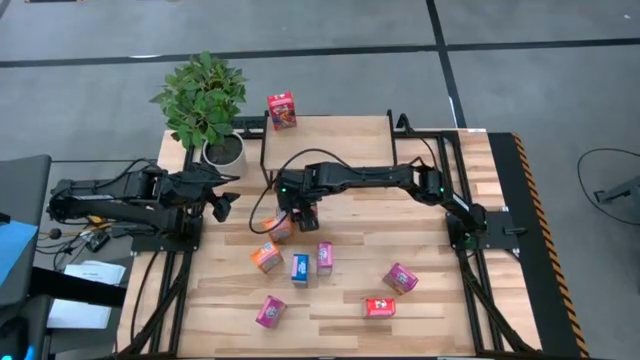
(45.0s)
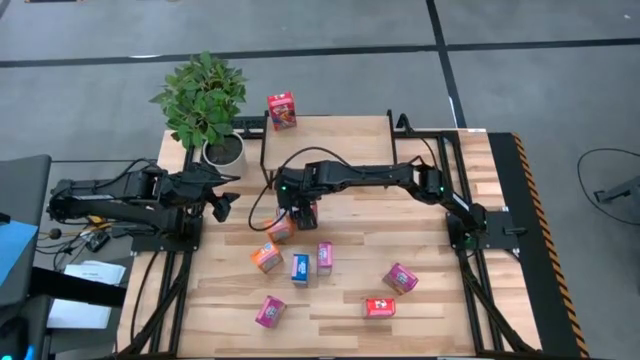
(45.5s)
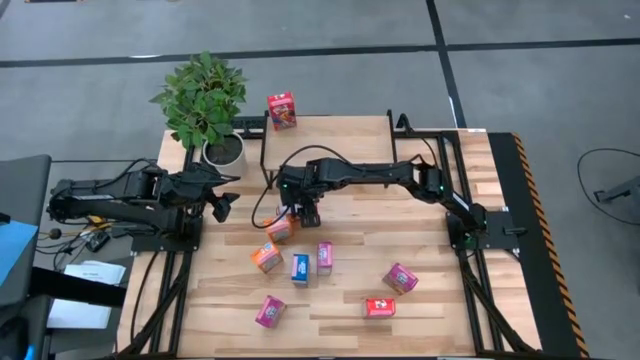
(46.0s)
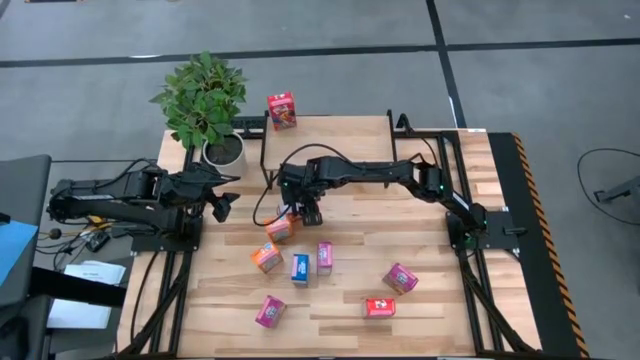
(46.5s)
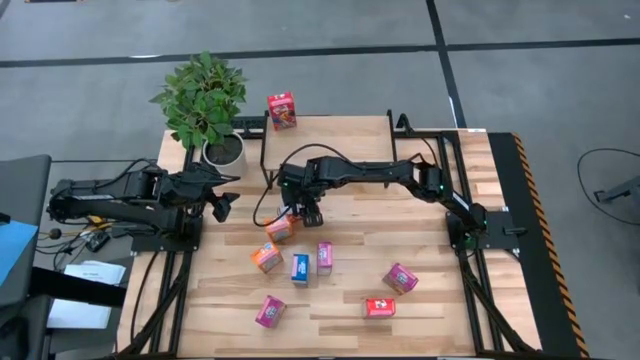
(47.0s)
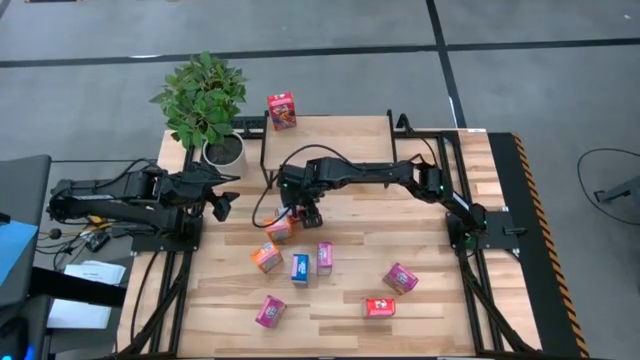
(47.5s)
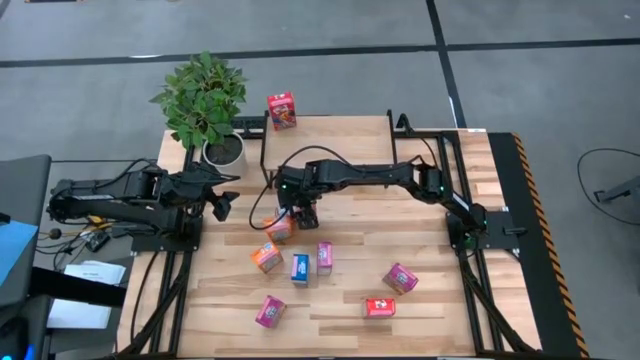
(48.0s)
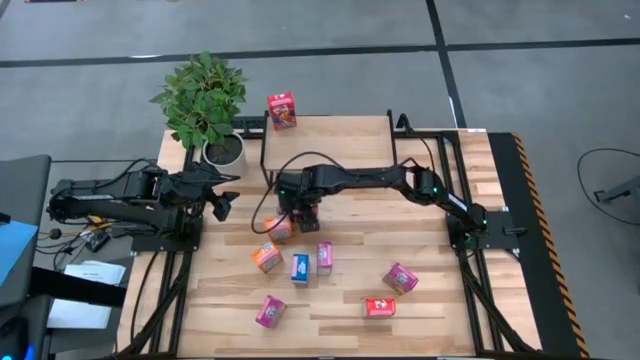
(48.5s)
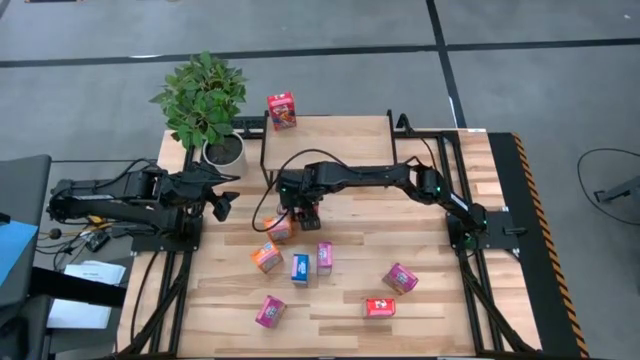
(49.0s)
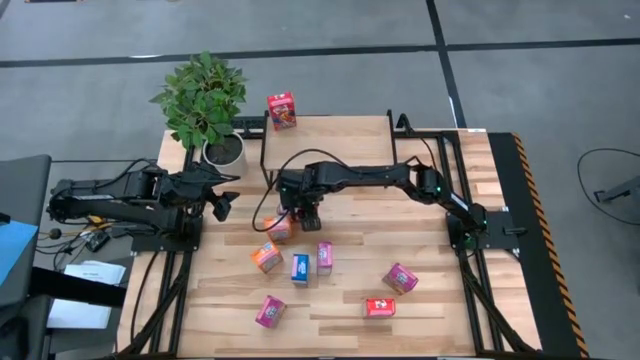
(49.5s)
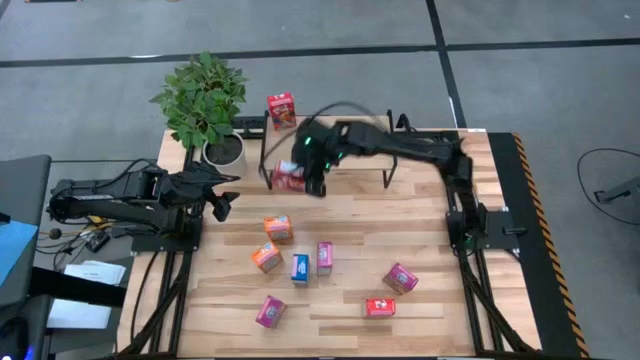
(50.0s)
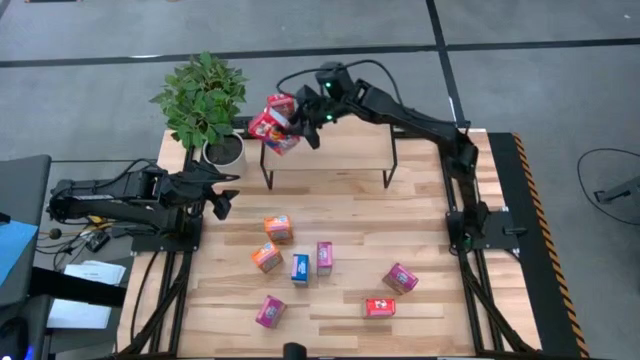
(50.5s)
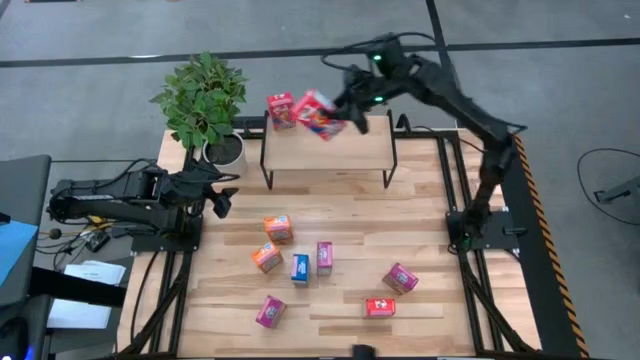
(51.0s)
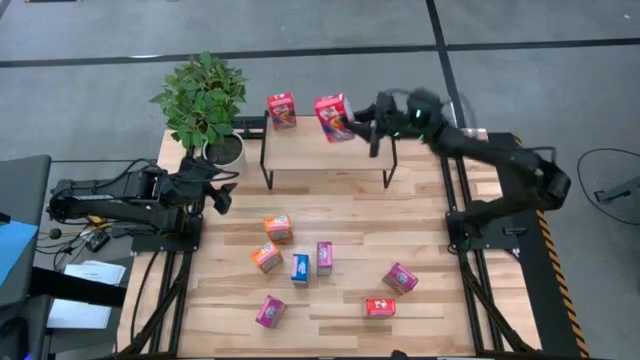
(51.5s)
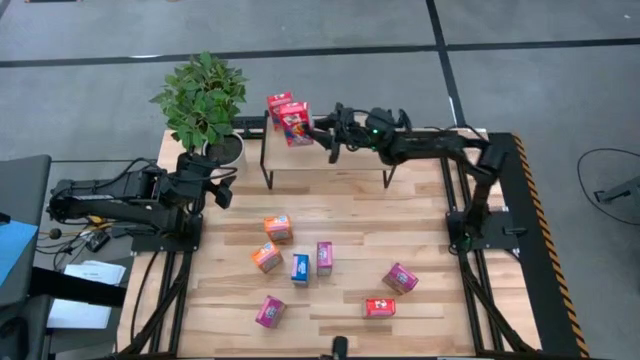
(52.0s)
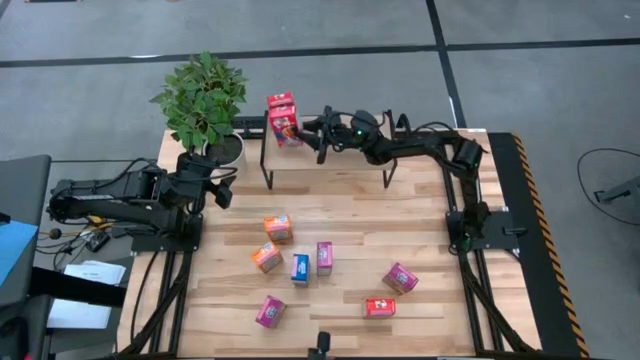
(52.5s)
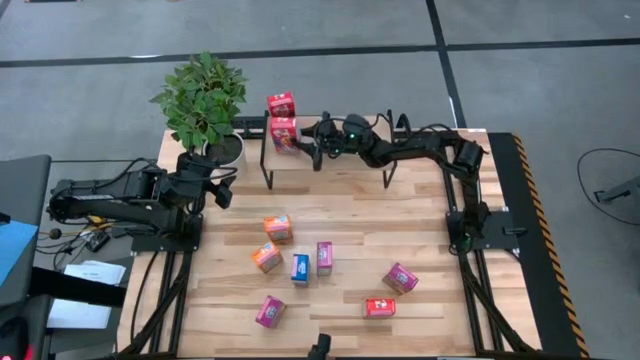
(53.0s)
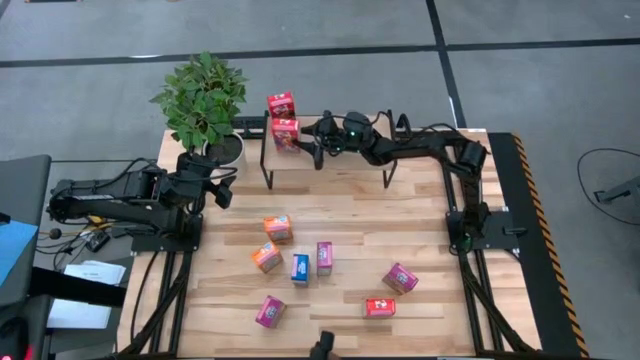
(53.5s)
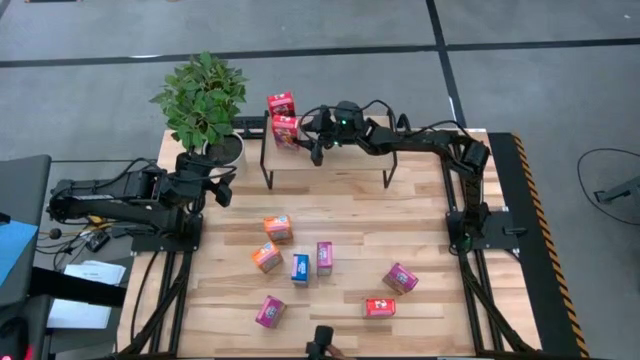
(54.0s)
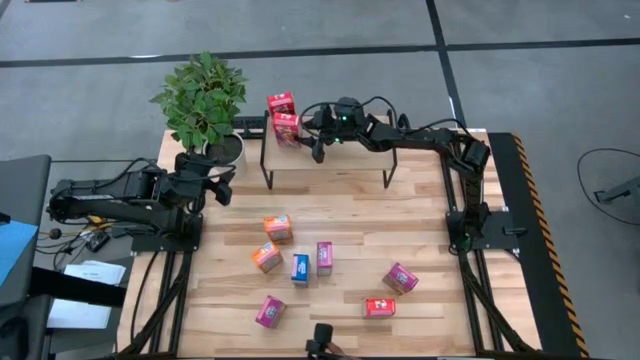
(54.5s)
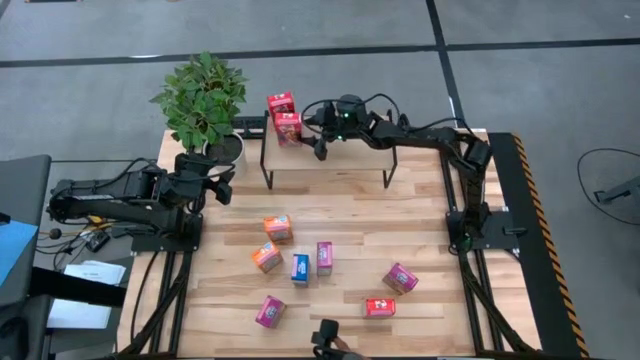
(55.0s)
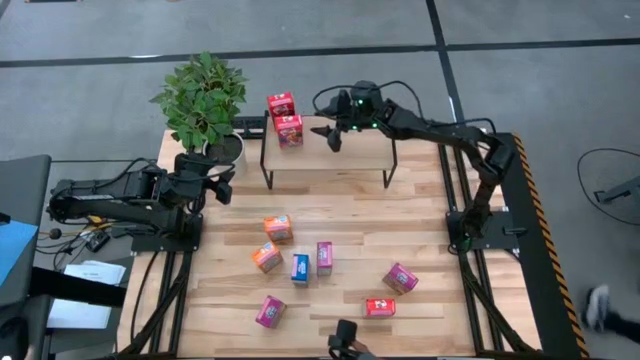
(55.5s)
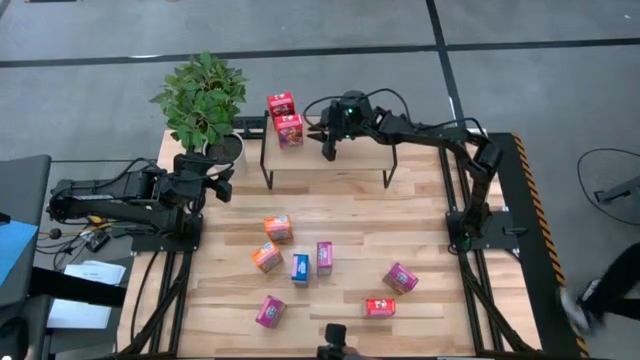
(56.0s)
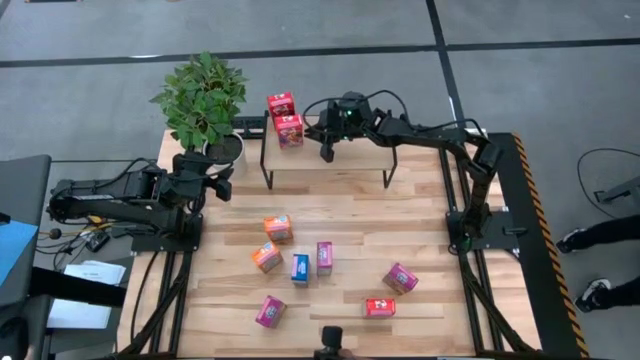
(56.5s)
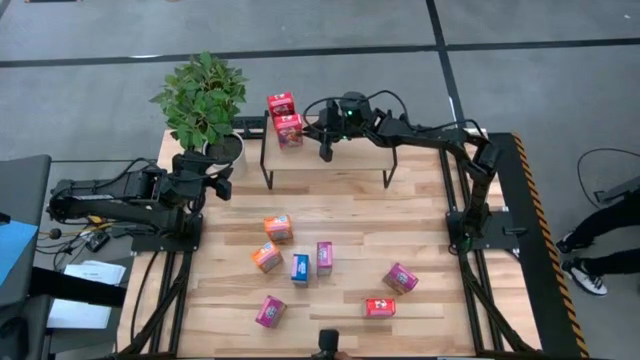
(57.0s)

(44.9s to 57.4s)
Task: Stack cereal on shelf
Put the top red cereal box on the shelf aligned with the other red cereal box on the shelf

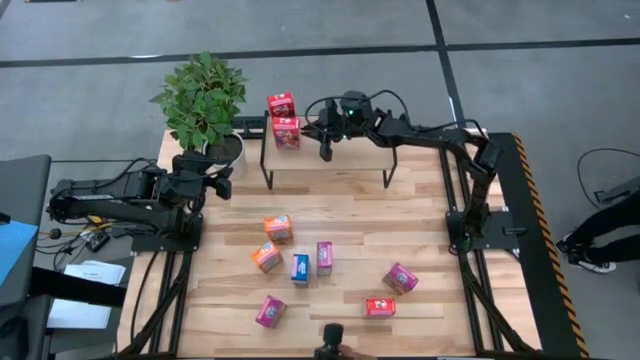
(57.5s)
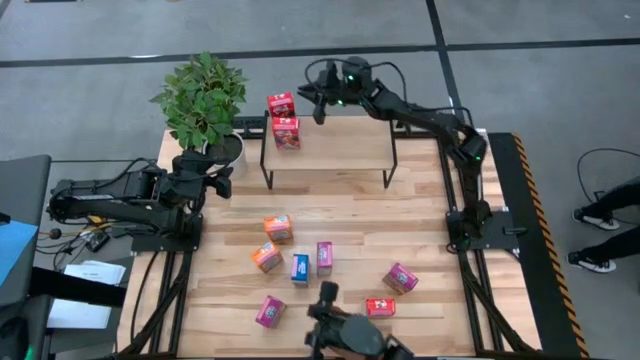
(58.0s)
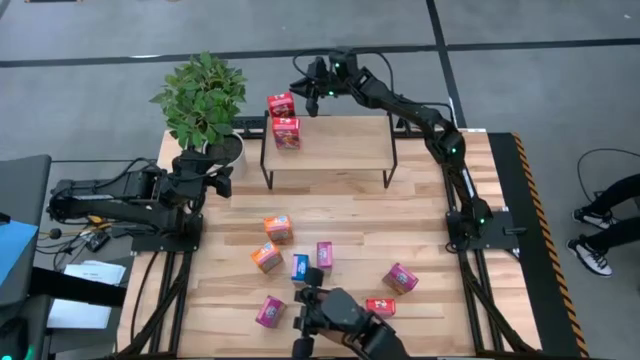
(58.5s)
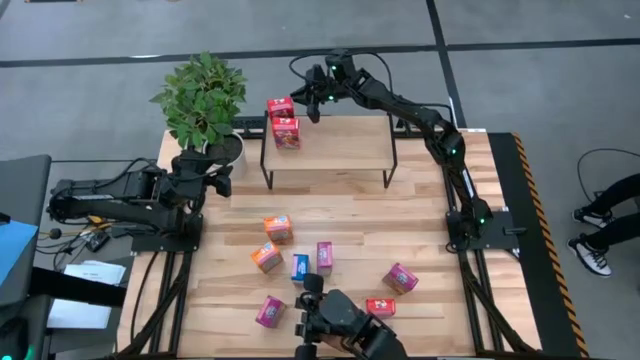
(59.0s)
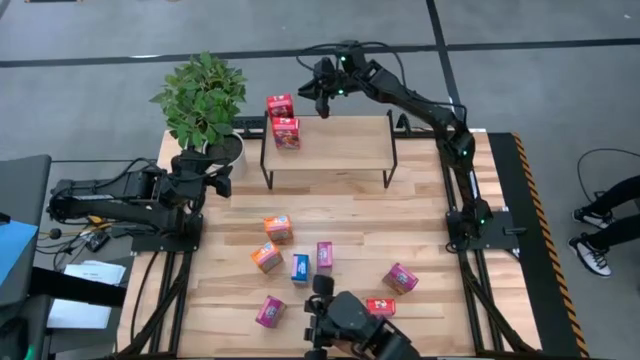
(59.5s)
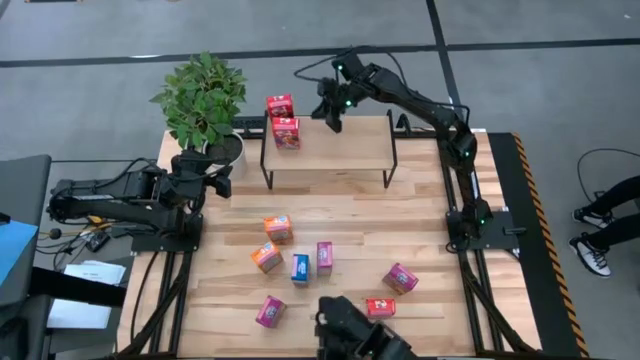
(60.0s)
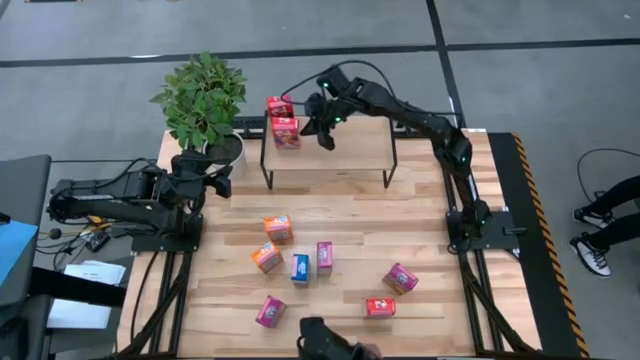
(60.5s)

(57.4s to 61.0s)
Adjust the red cereal boxes on the shelf

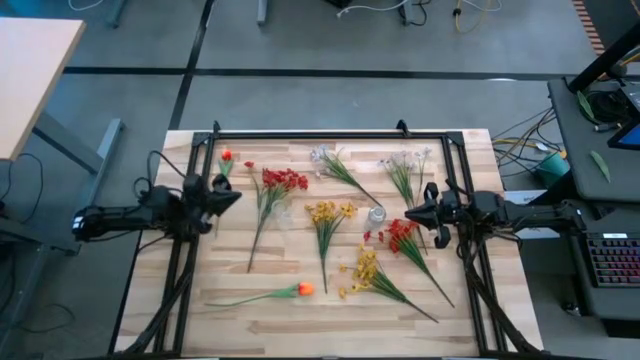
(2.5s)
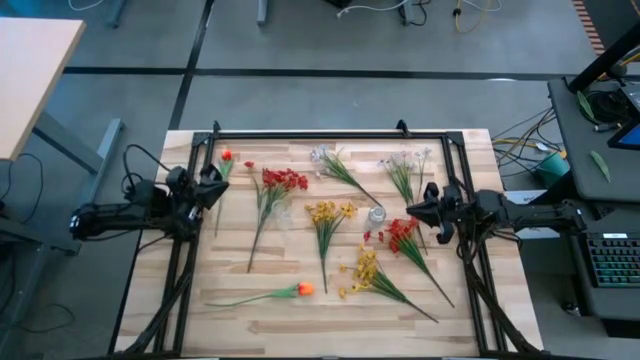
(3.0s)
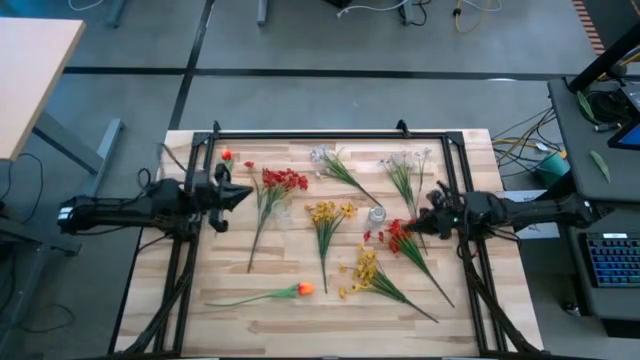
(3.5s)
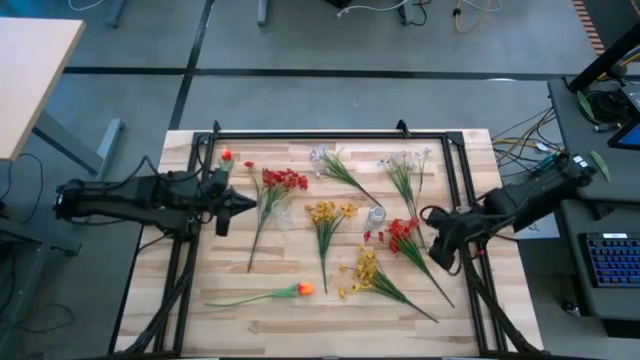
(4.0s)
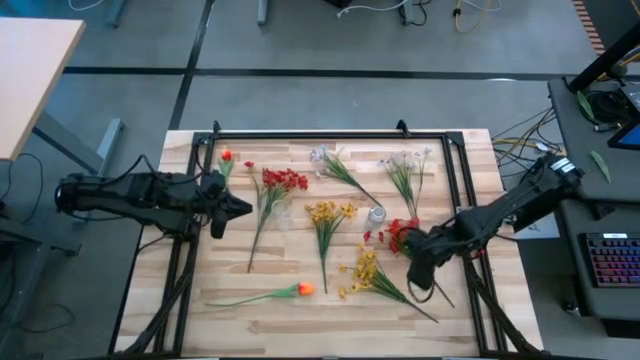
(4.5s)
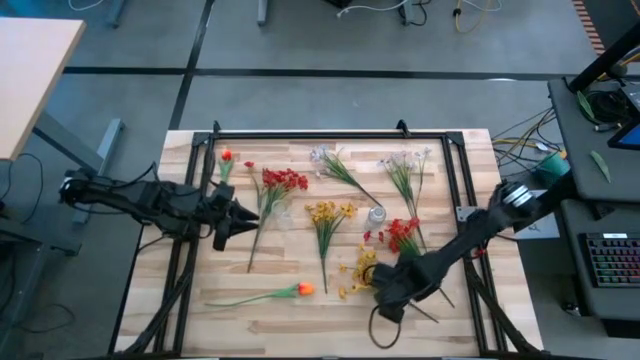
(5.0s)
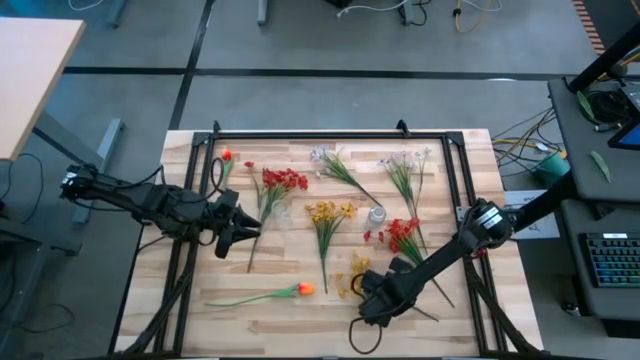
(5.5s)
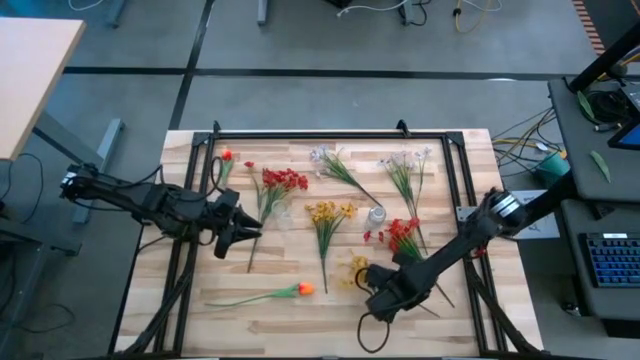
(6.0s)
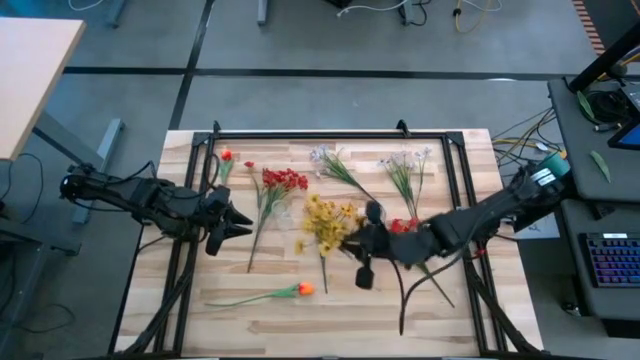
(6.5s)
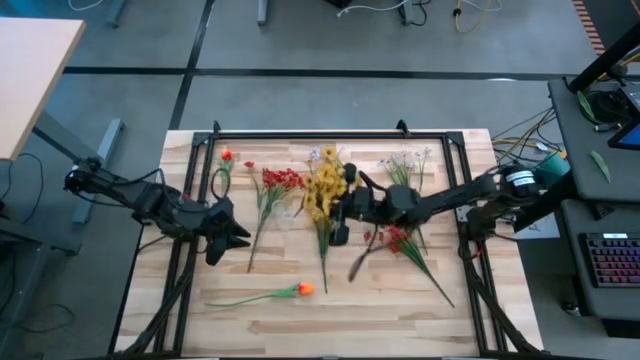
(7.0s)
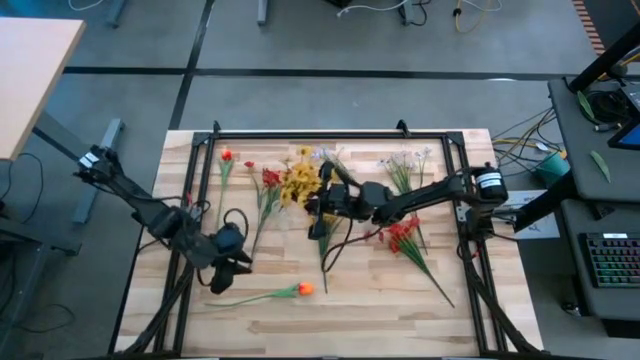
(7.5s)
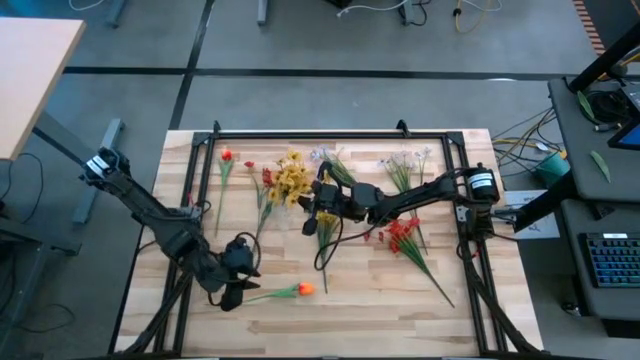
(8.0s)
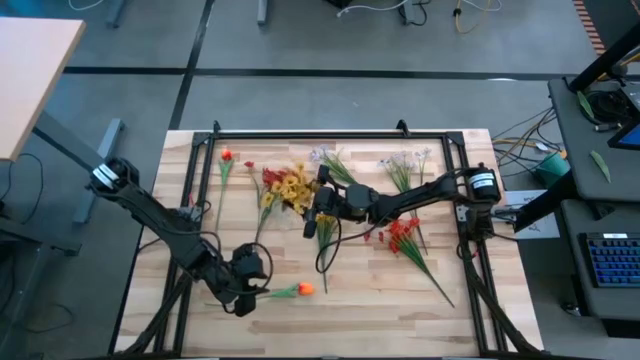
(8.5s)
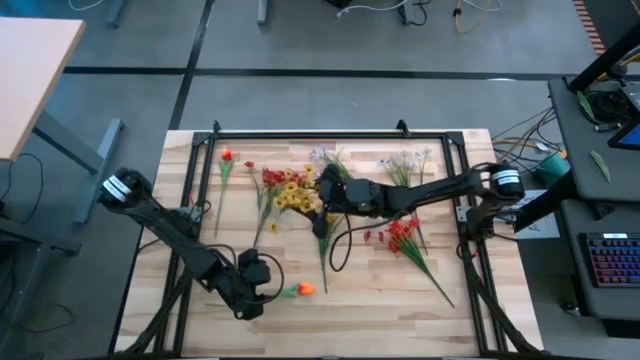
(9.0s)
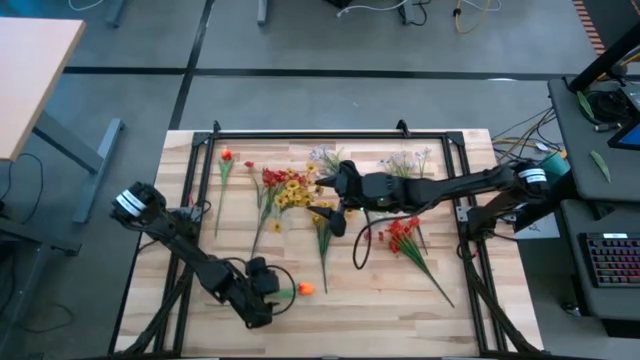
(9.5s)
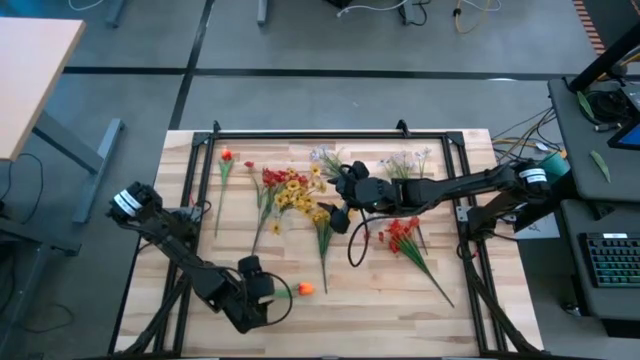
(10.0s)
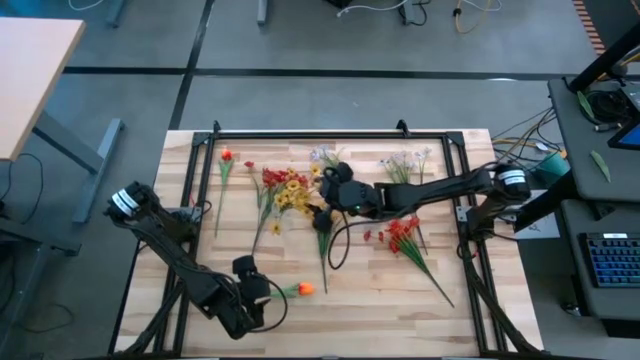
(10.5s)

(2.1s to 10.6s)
Task: Sort flowers into vase by color
Put the right yellow flower into the left transparent vase
